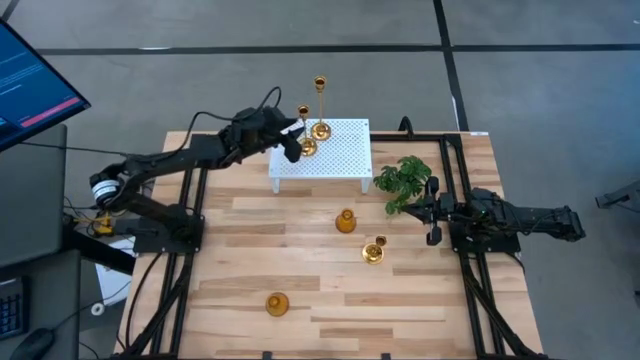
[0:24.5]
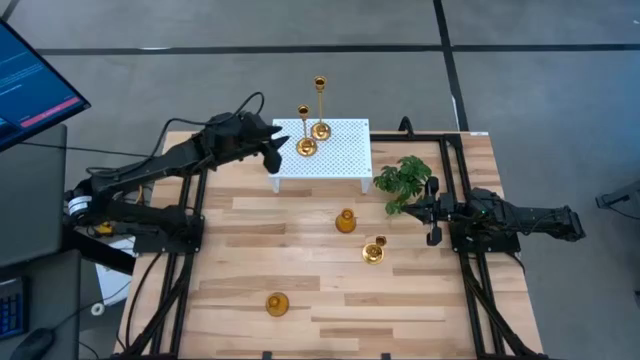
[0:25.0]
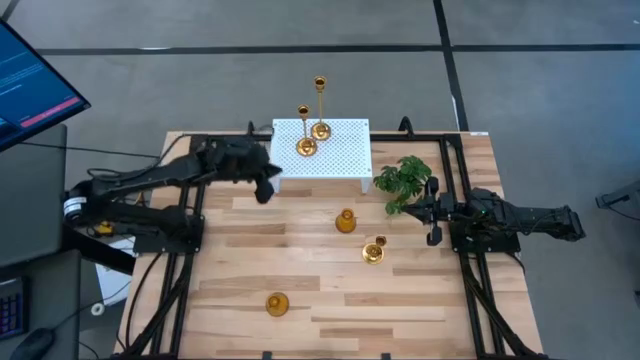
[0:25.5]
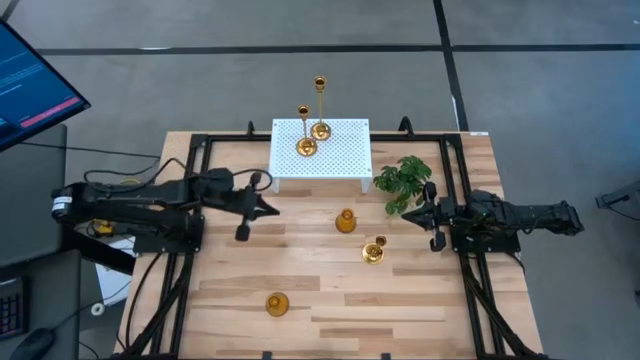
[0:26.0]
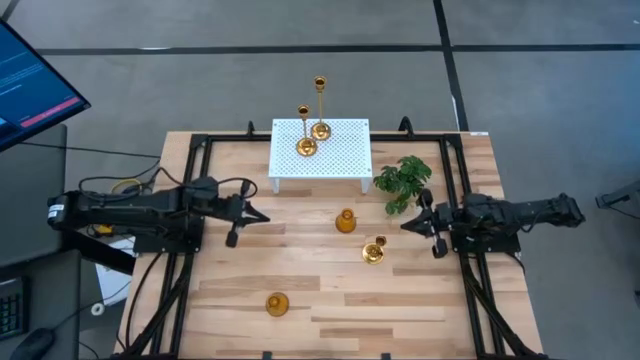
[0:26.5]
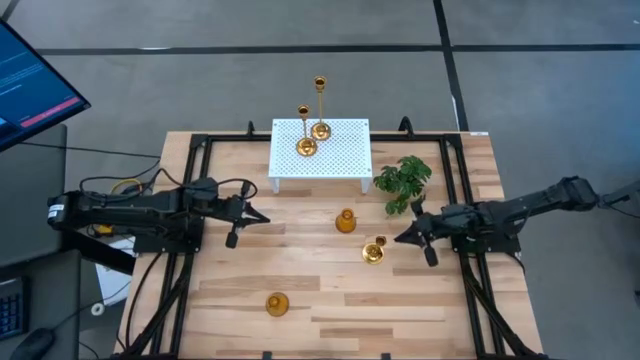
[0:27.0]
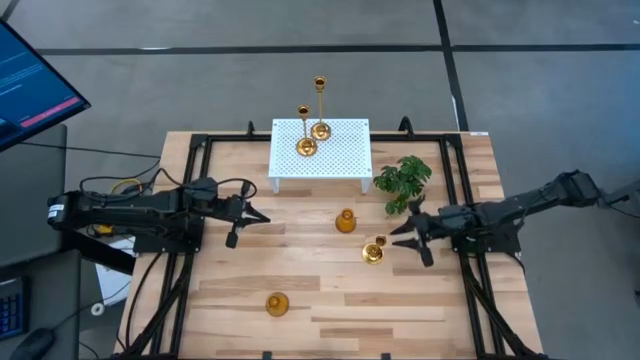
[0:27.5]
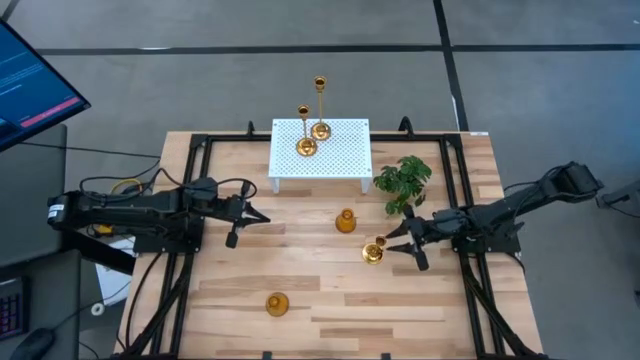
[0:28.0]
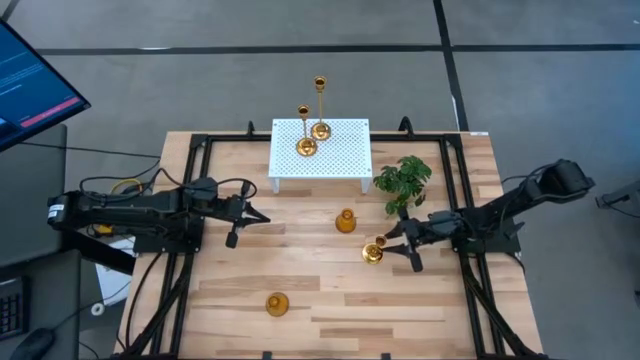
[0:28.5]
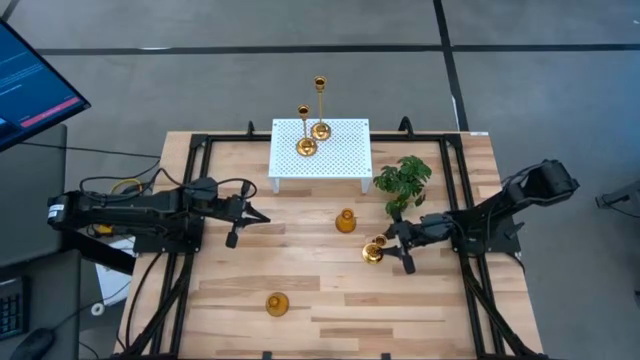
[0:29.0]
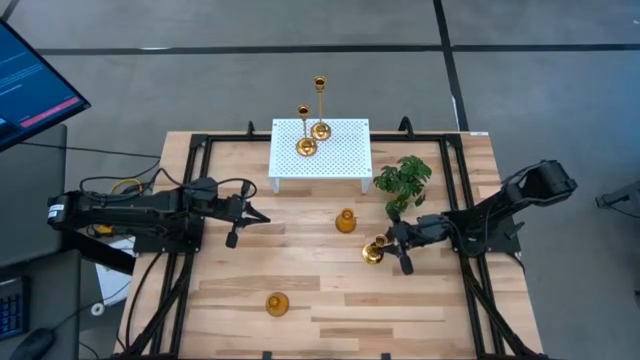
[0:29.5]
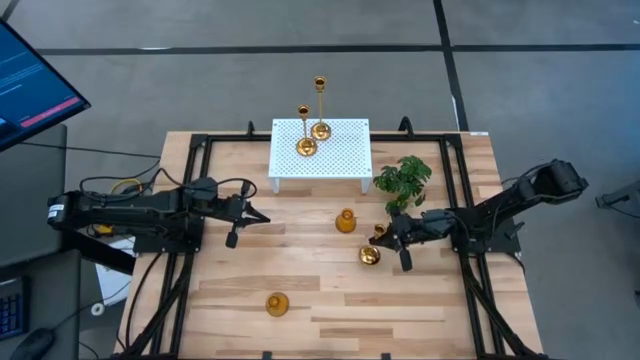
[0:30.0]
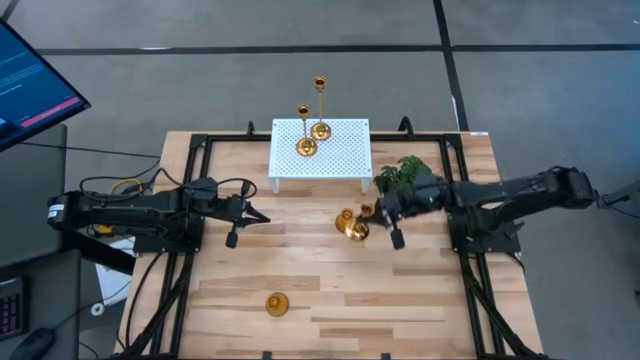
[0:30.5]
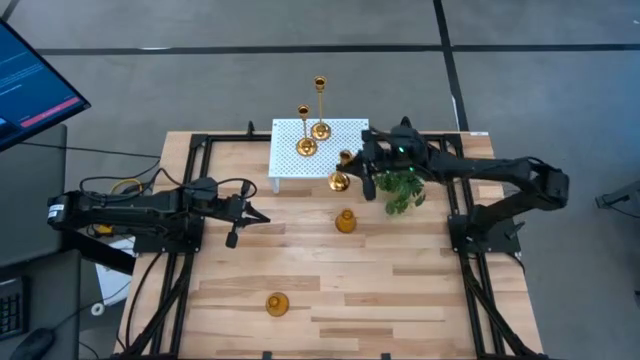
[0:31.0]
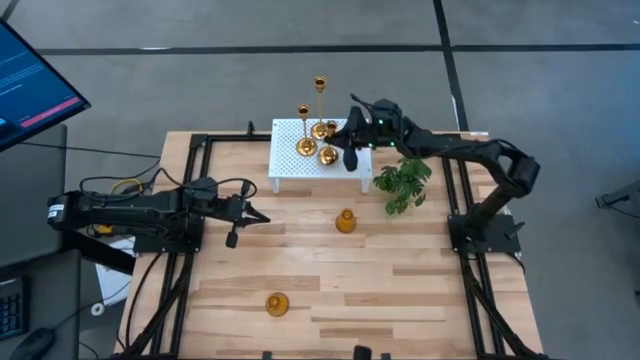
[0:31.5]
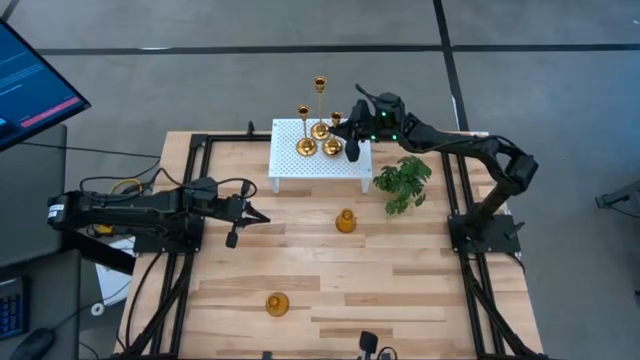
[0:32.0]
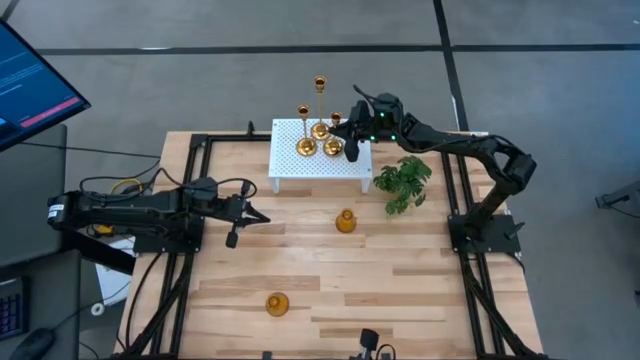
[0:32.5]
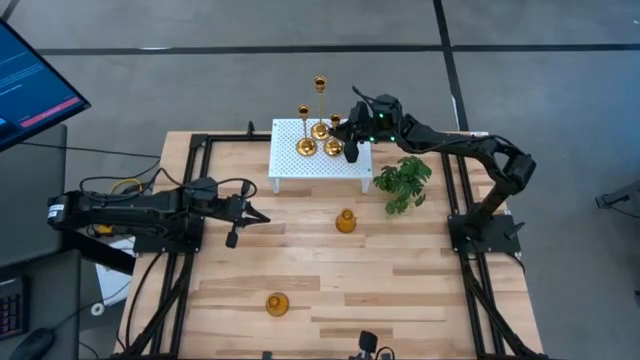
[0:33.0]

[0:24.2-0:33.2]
Task: Pick & Place candle stick holders
Put the gold candle holder on the shelf

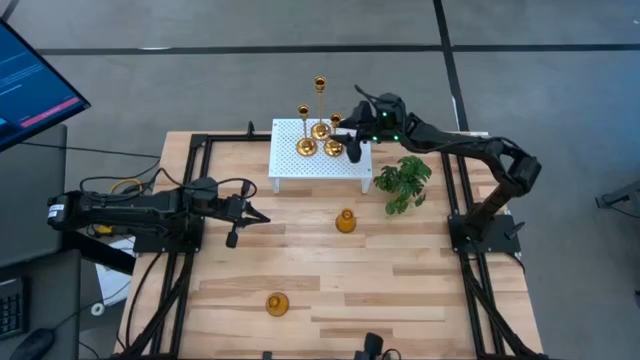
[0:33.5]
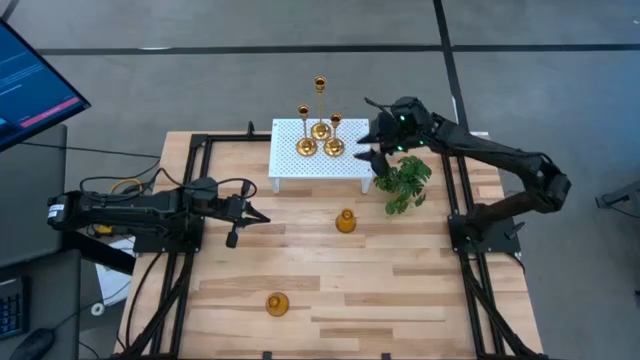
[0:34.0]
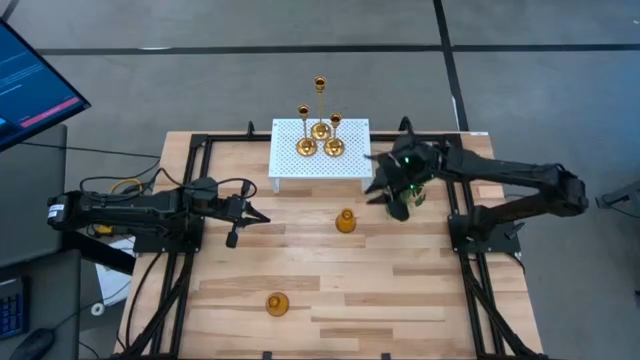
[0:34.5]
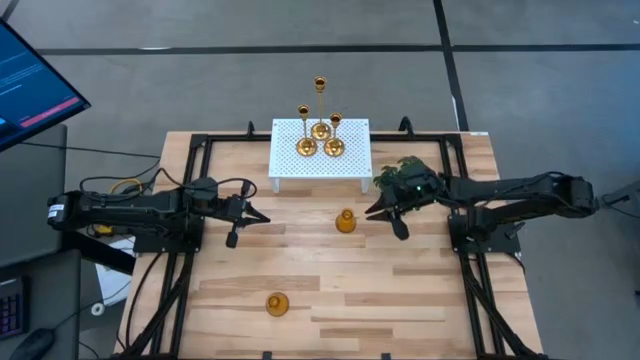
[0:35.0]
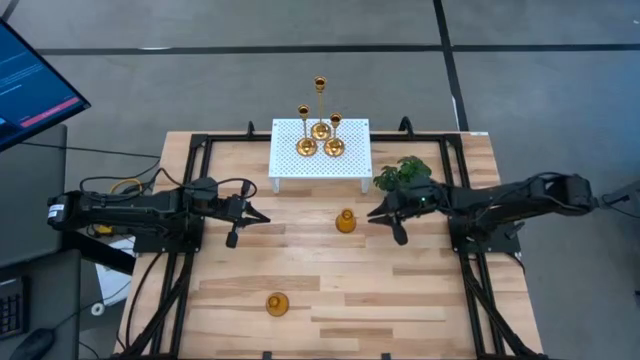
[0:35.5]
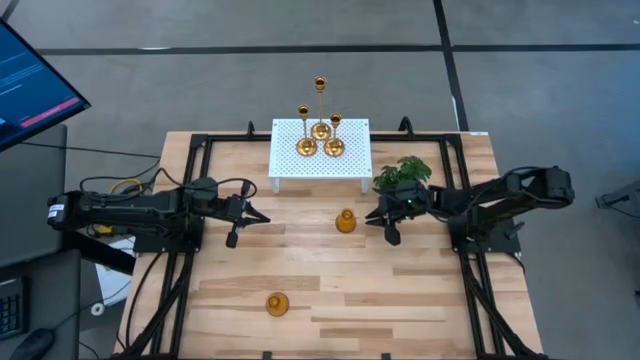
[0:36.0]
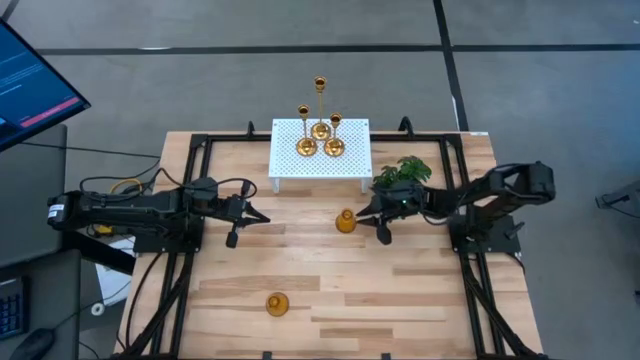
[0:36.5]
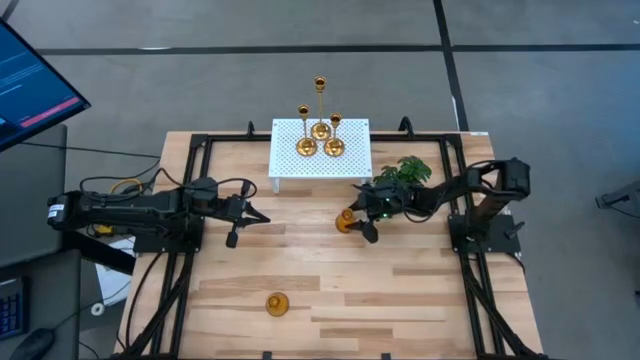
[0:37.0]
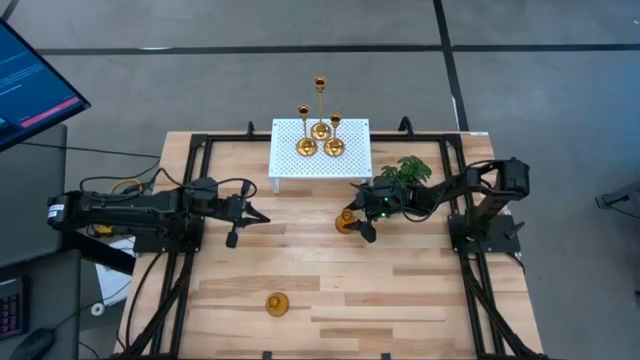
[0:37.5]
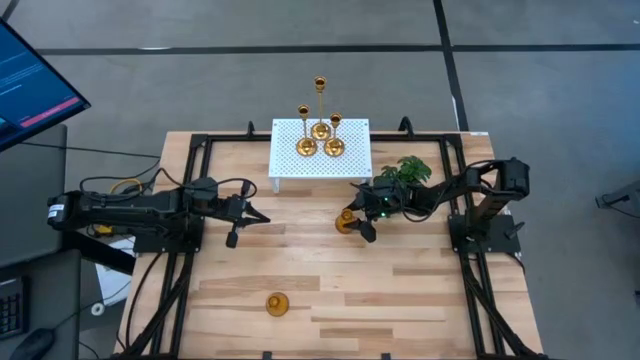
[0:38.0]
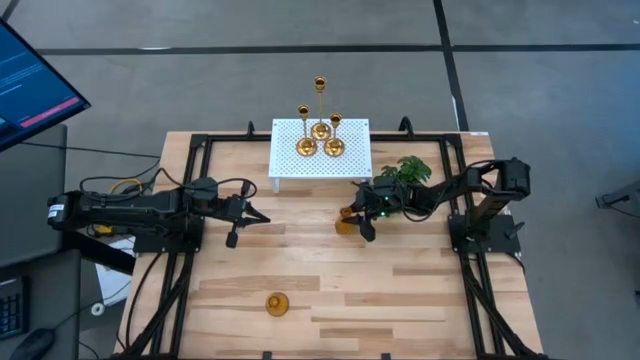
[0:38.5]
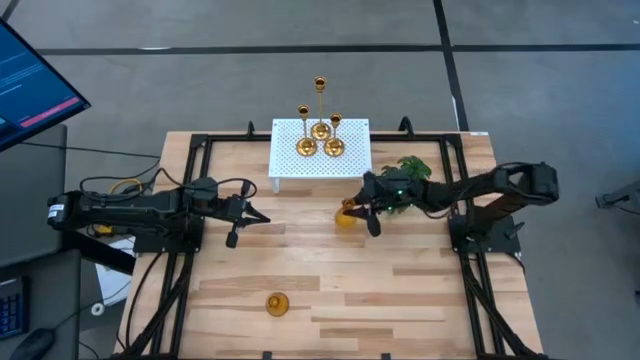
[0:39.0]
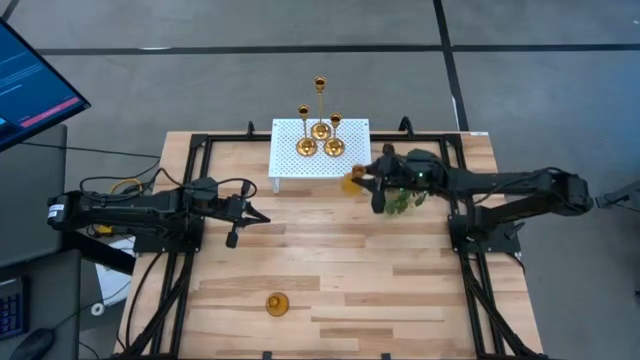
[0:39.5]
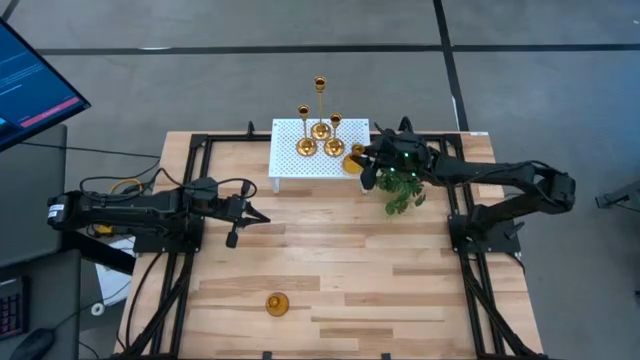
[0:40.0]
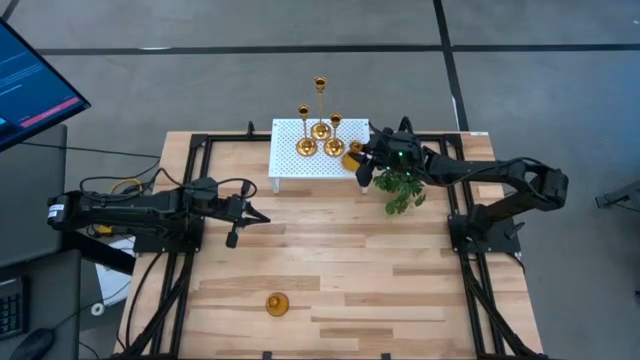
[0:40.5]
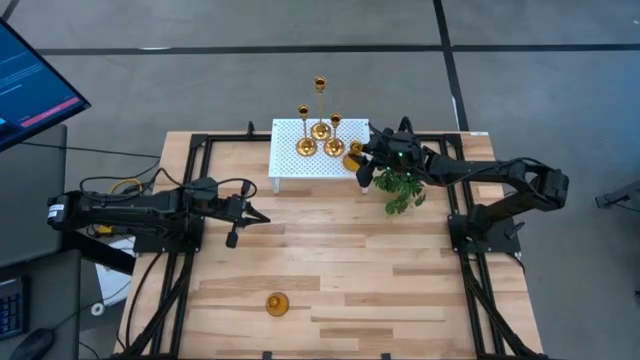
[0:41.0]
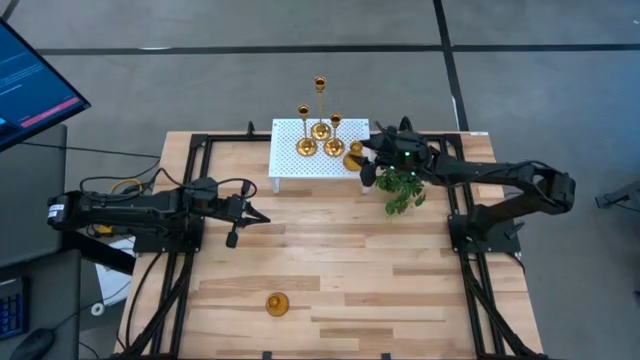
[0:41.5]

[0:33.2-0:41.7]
Put the top yellow candle holder on the shelf

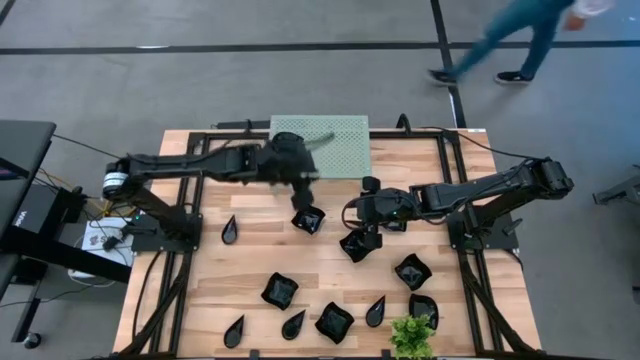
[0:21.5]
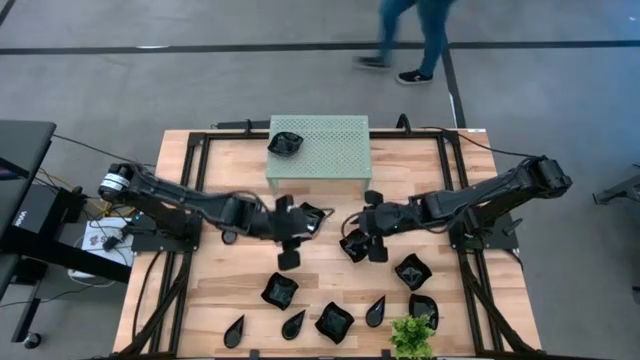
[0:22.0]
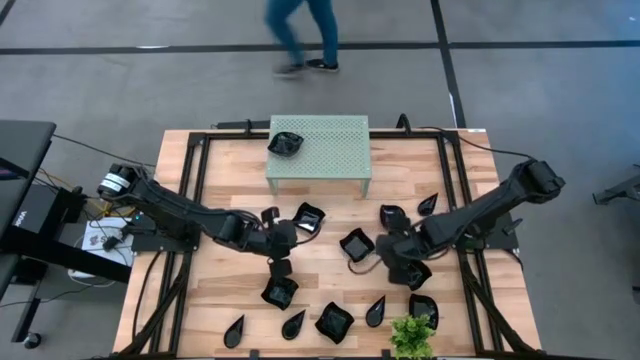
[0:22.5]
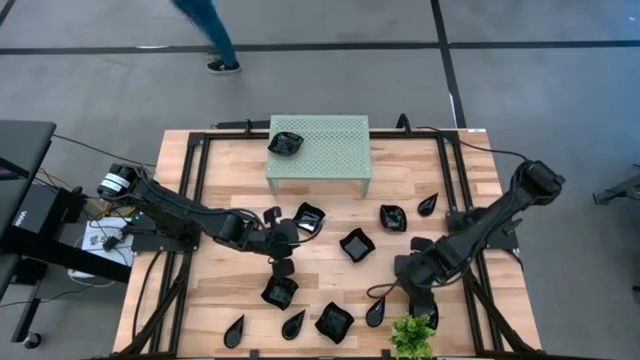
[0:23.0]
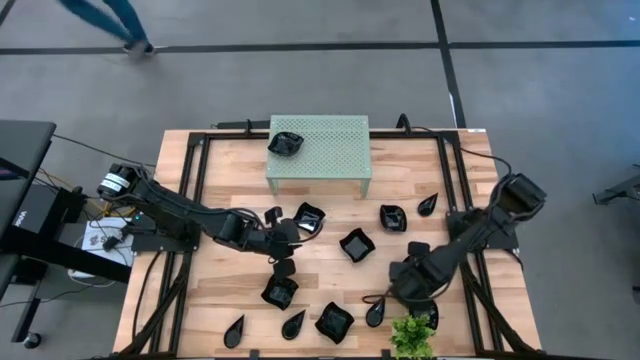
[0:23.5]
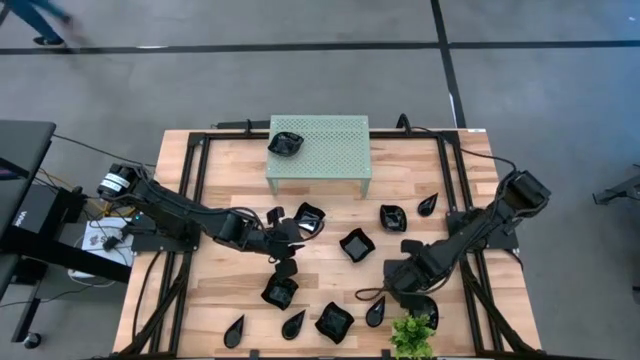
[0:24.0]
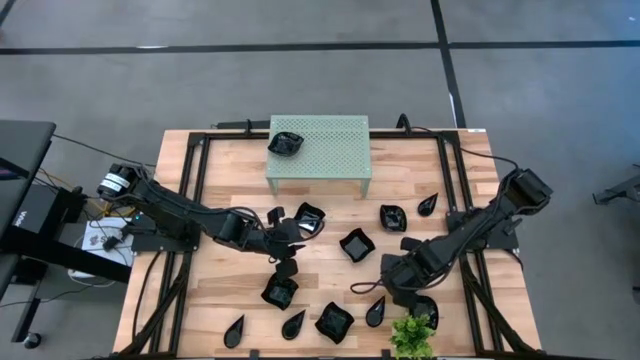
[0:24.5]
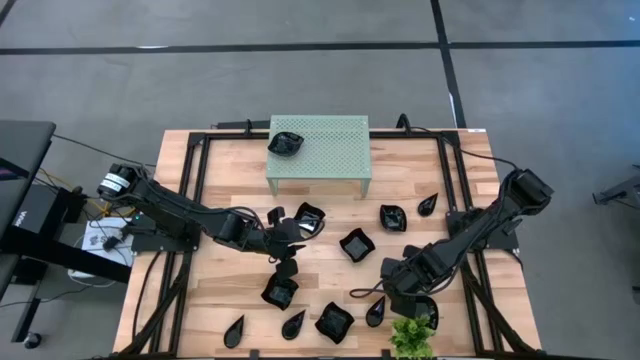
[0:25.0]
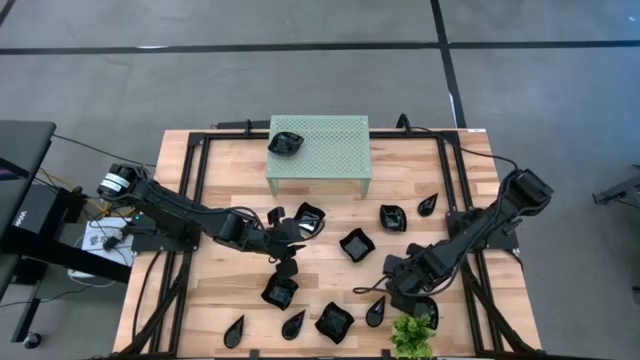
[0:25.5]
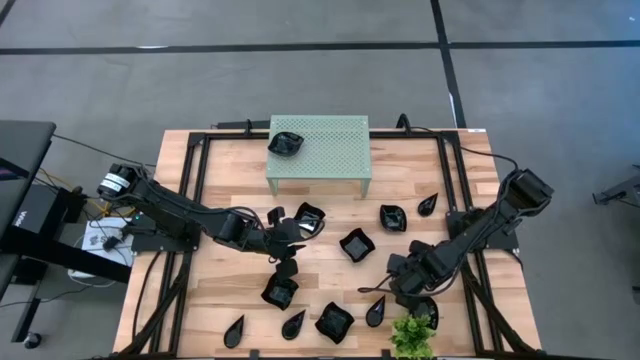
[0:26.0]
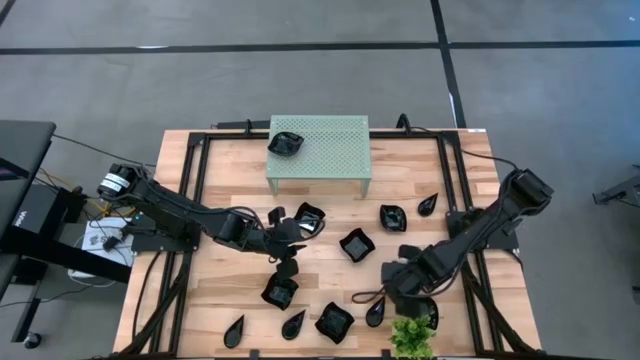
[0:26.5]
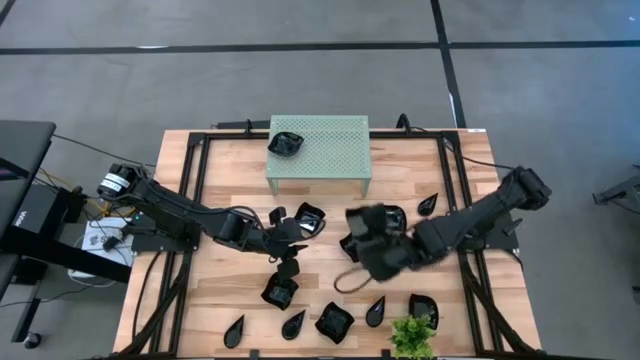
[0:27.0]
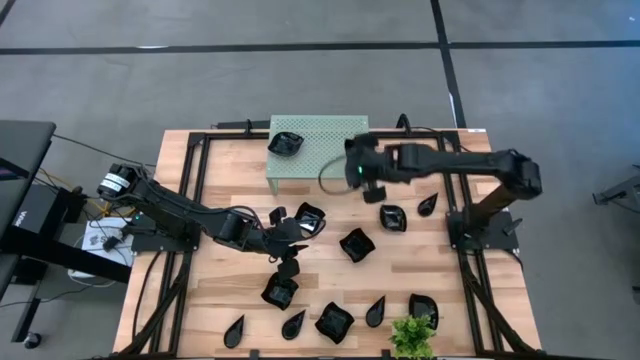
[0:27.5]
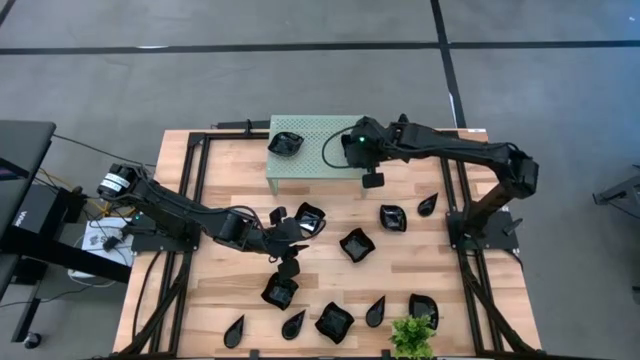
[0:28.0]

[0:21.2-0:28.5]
Task: Pick & Place Mini shaped plates
Put the distorted square plate on the shelf
